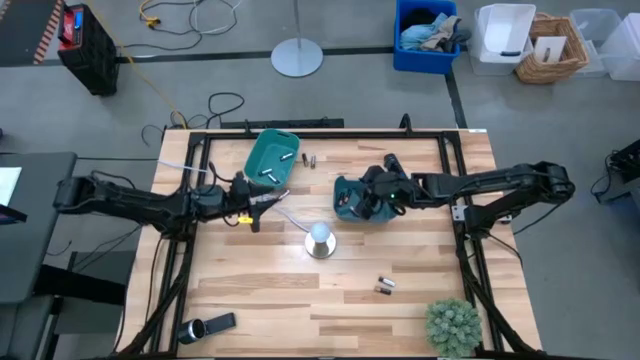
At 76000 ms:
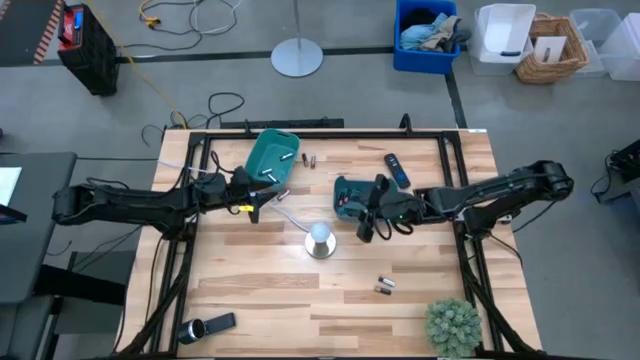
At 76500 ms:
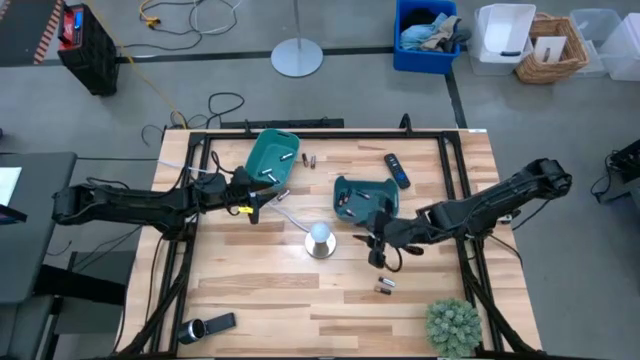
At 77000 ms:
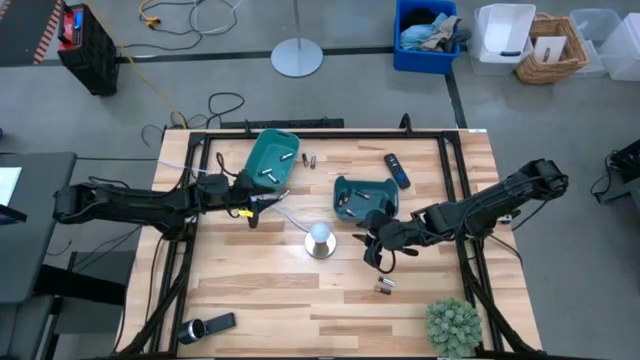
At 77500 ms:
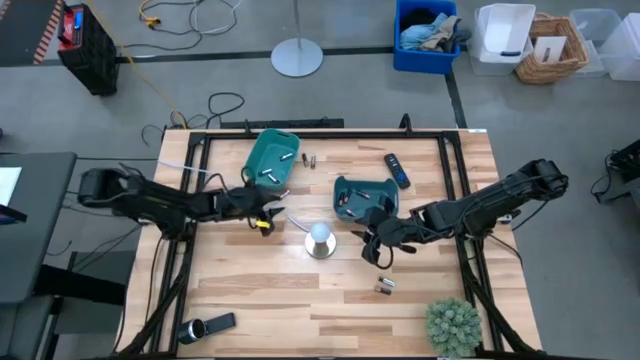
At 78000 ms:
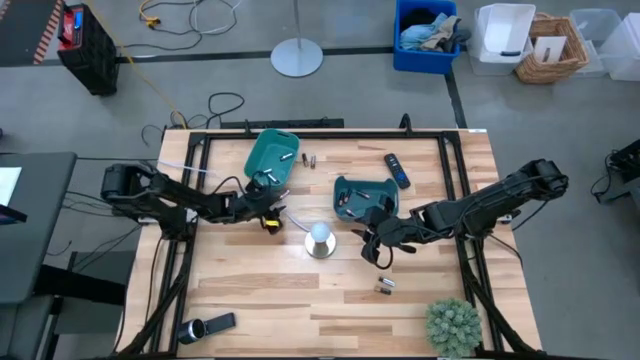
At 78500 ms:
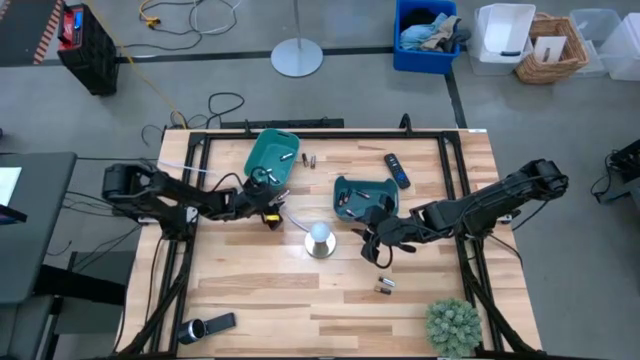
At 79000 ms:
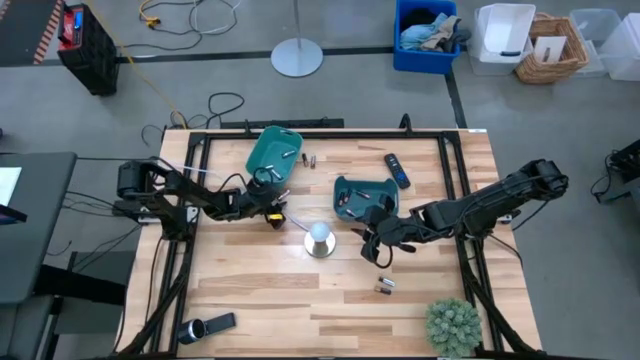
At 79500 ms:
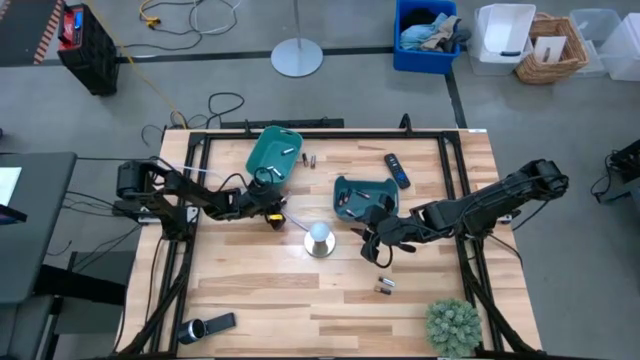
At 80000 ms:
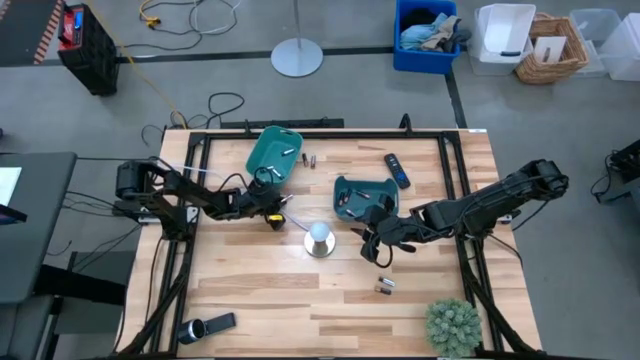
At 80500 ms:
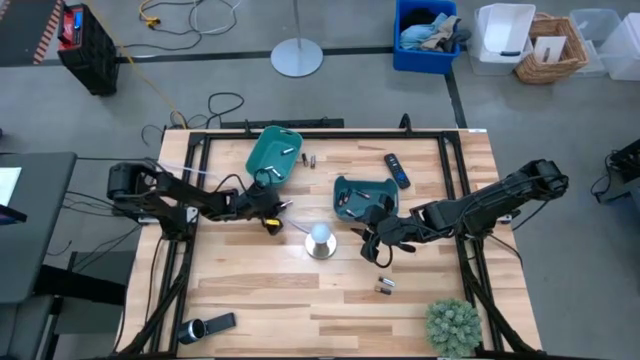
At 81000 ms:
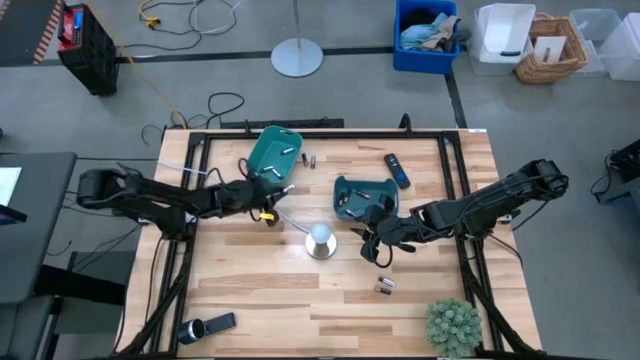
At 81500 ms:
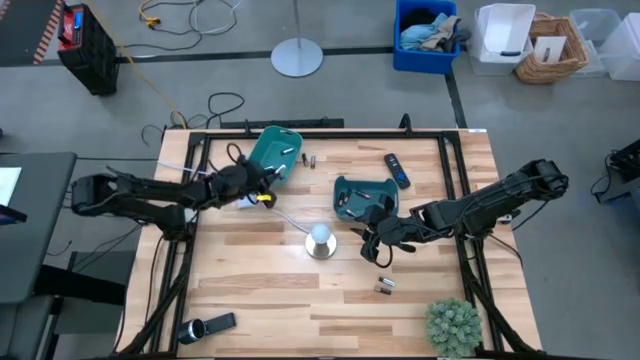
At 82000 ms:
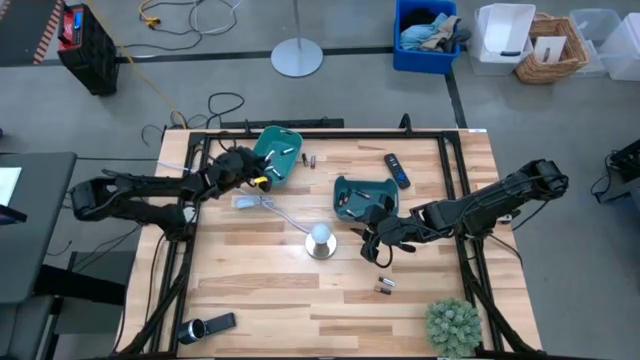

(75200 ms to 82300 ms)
Task: Sort batteries
Put the silver battery into the green bin

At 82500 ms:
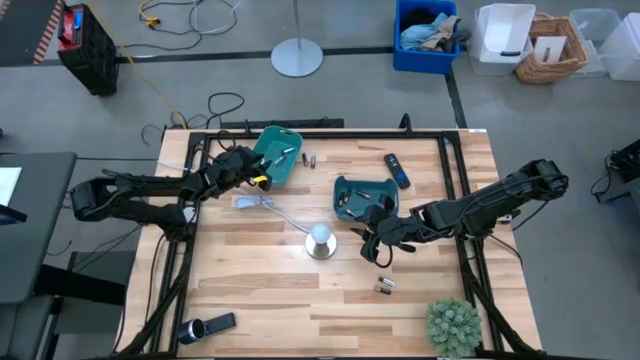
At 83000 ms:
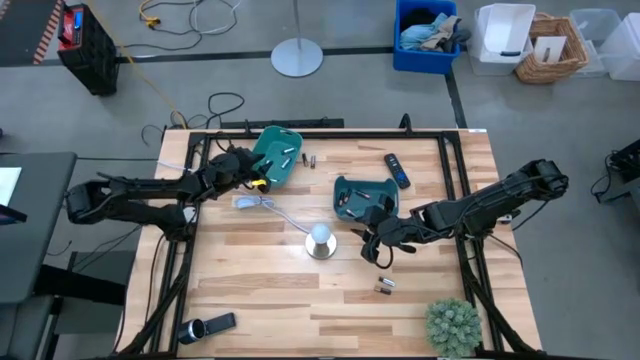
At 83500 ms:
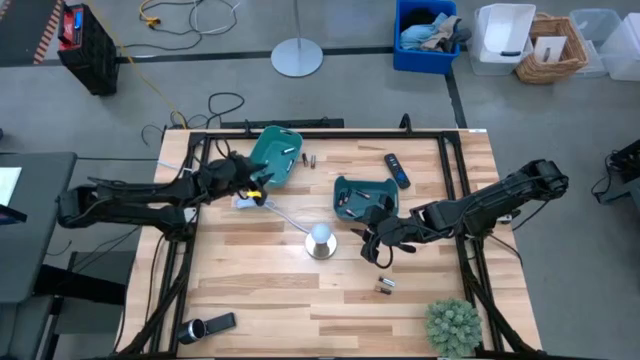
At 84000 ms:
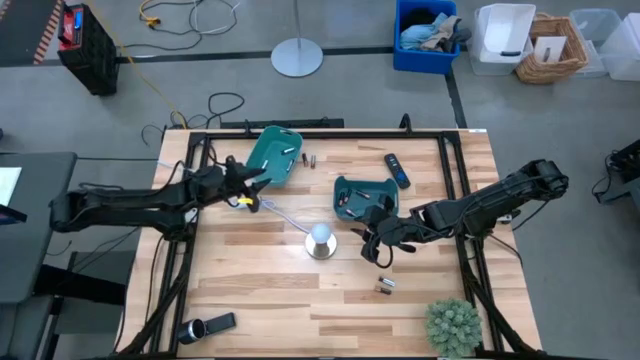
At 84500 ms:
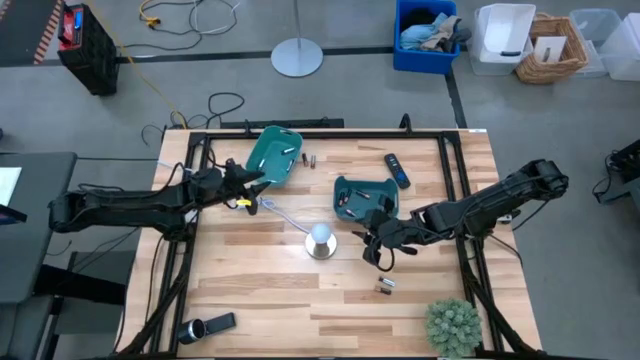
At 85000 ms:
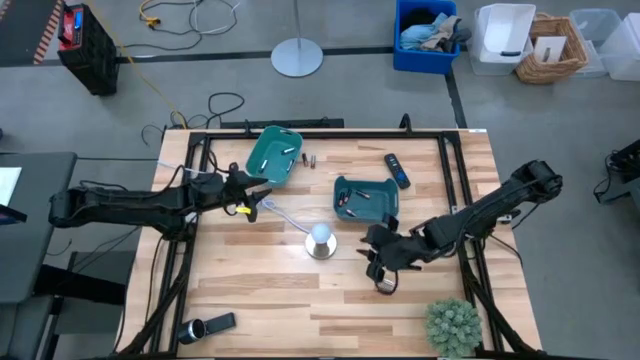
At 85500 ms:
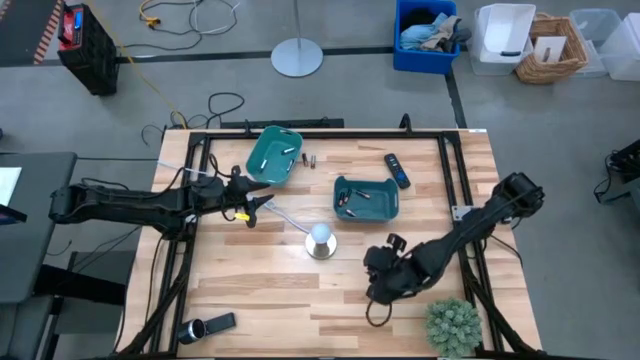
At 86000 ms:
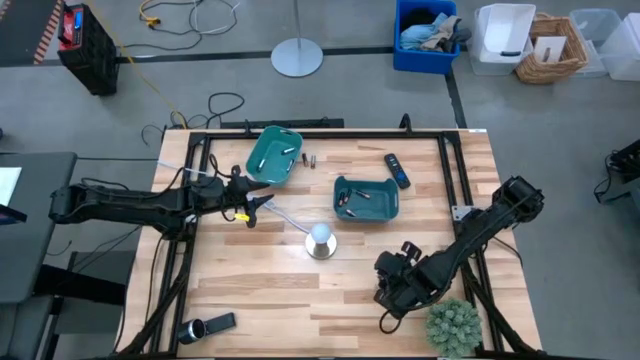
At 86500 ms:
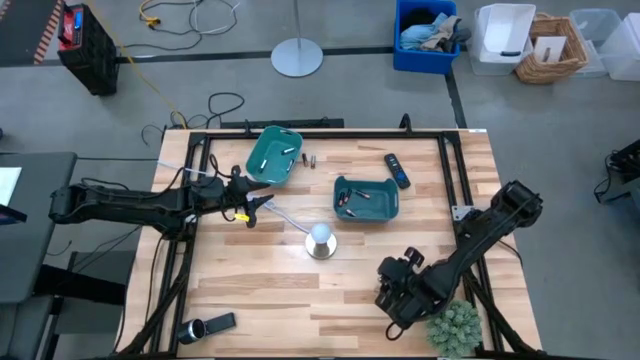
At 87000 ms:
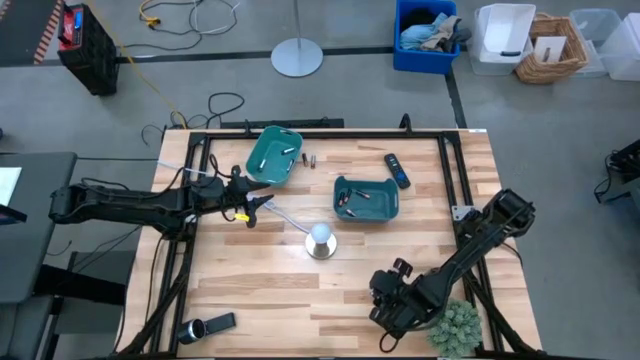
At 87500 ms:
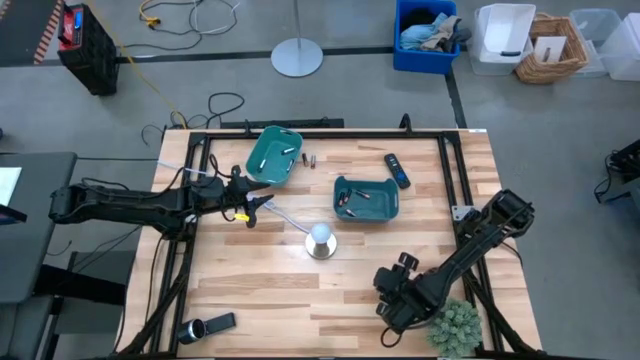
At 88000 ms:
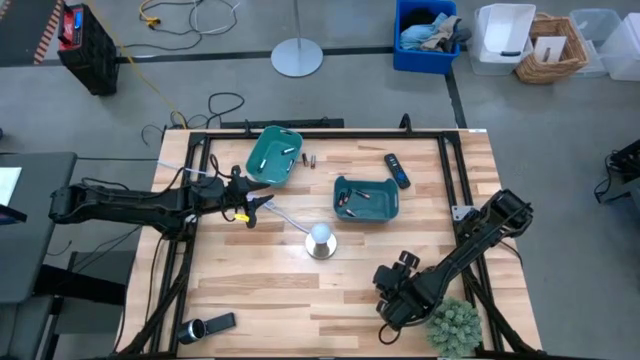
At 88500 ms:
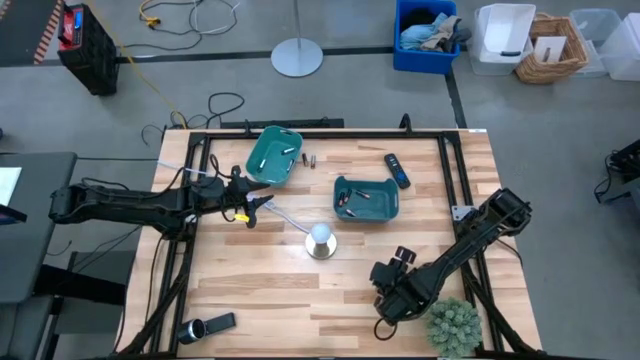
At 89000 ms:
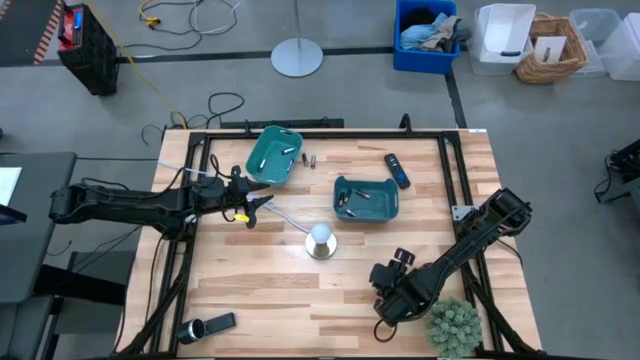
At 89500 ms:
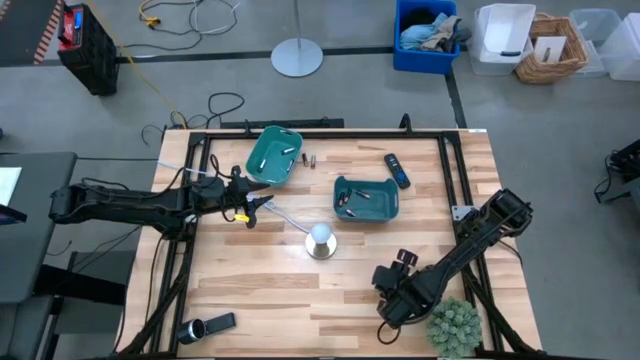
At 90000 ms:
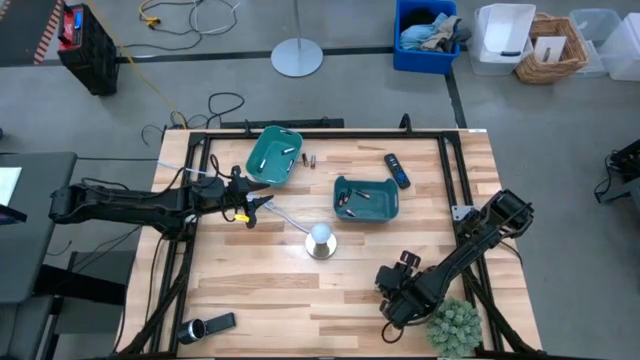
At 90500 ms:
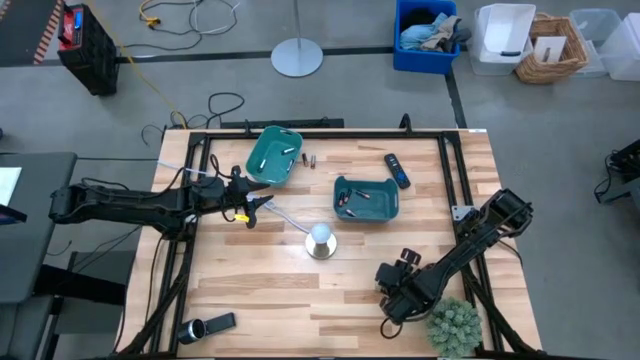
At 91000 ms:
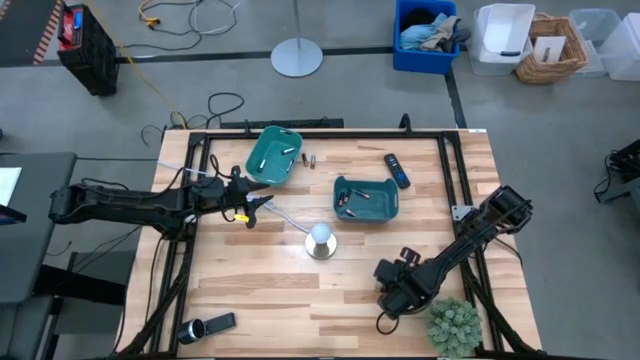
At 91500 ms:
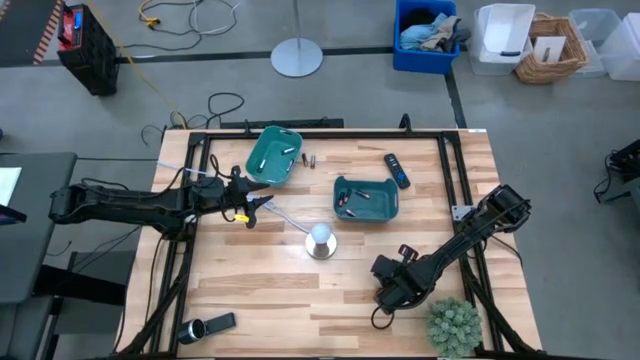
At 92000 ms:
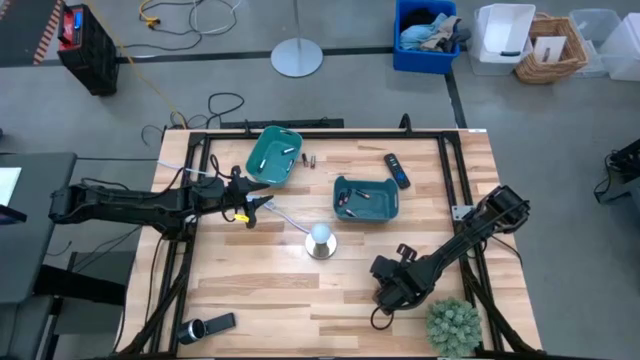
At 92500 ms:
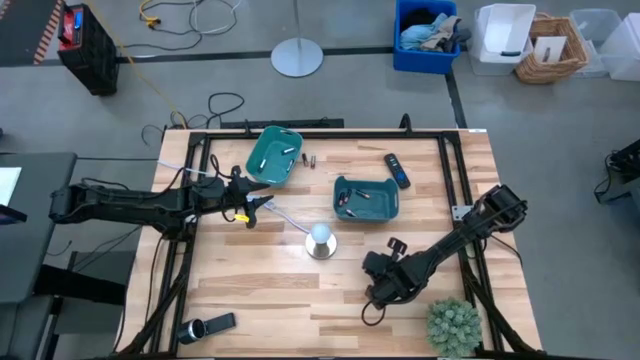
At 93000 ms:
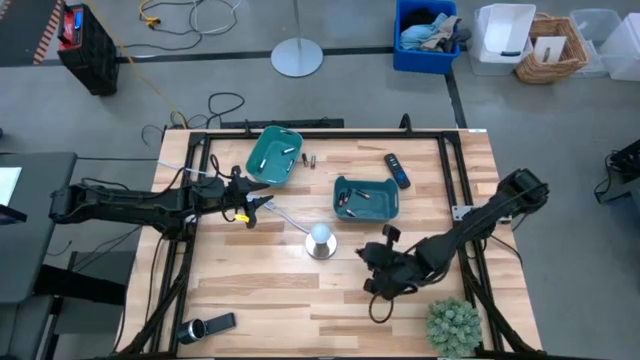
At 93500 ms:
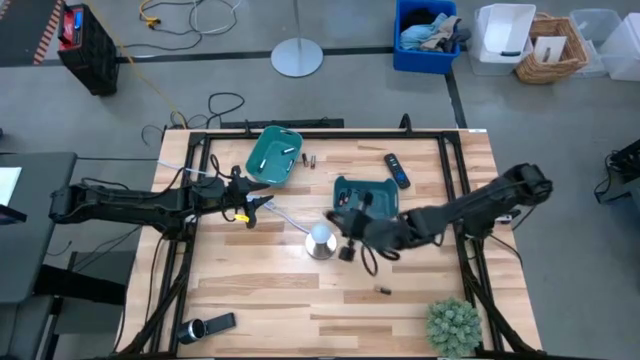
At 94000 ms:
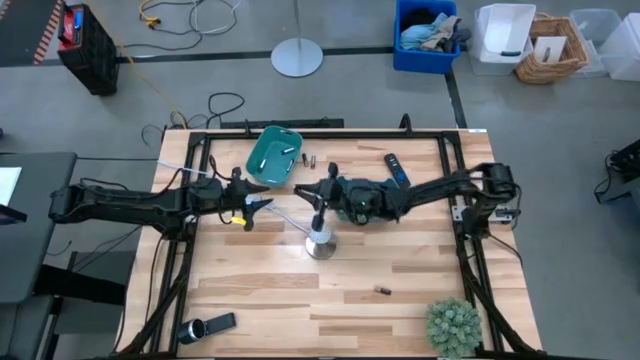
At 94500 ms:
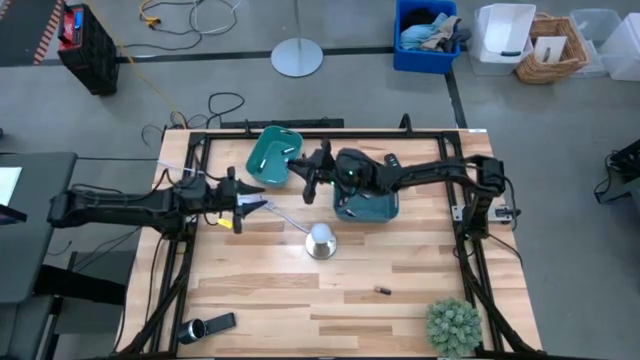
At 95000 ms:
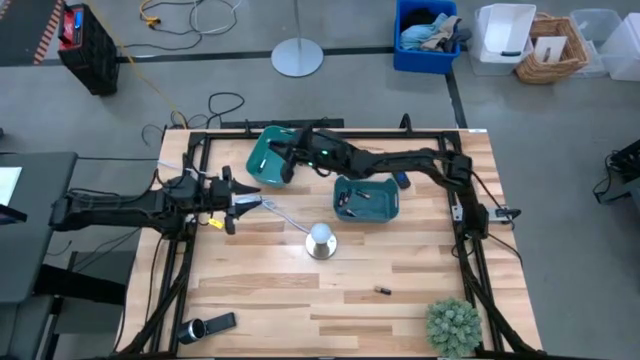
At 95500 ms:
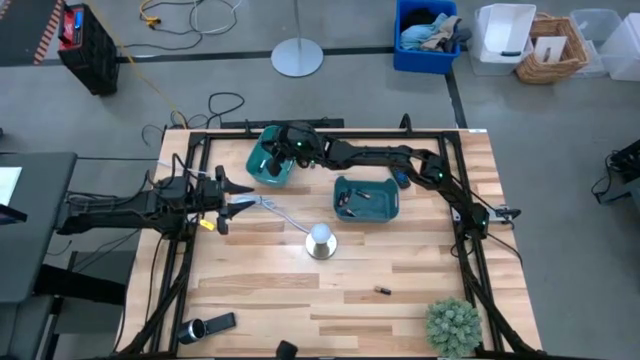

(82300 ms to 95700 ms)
Put the silver battery into the green bin
